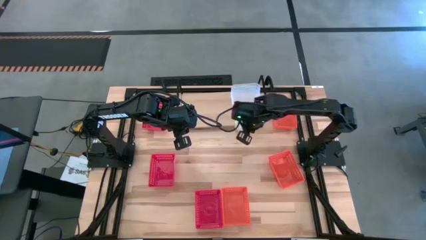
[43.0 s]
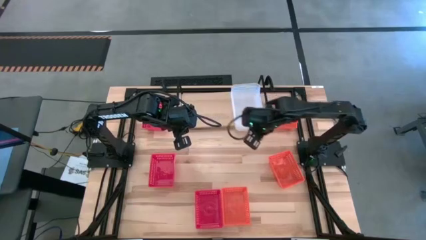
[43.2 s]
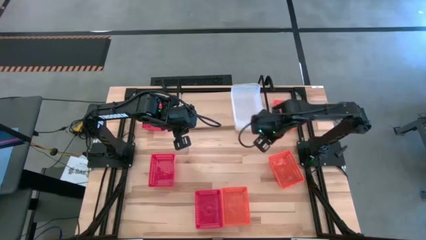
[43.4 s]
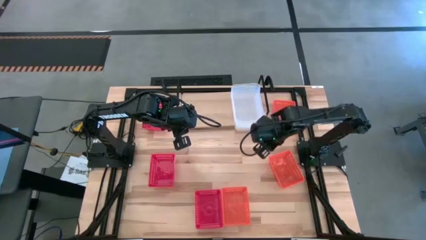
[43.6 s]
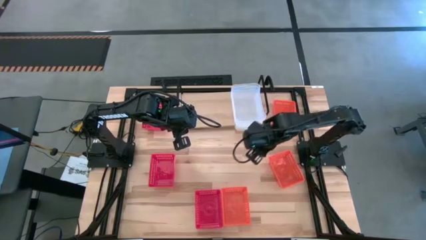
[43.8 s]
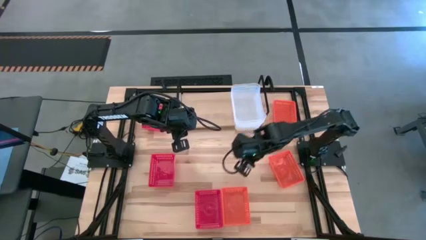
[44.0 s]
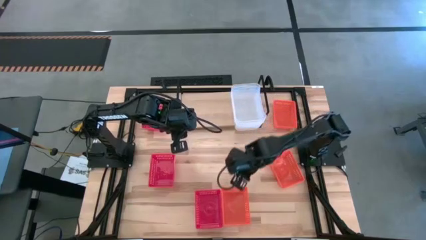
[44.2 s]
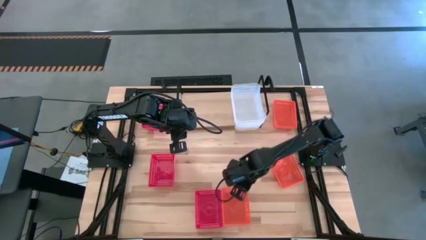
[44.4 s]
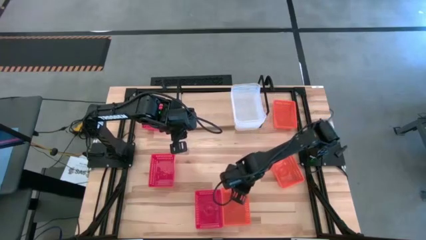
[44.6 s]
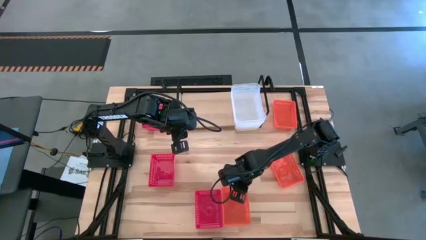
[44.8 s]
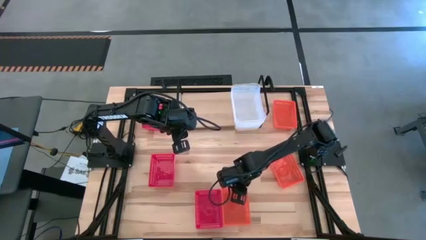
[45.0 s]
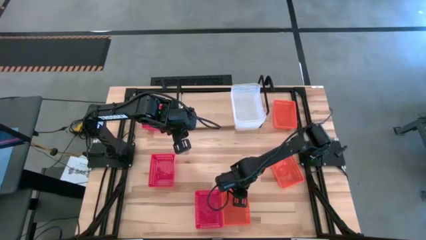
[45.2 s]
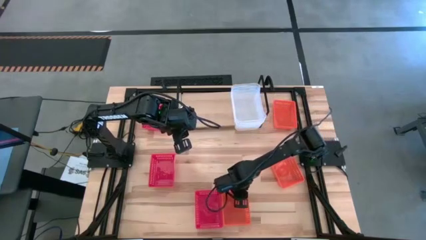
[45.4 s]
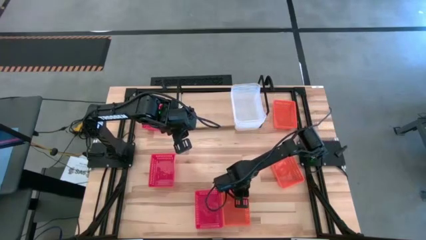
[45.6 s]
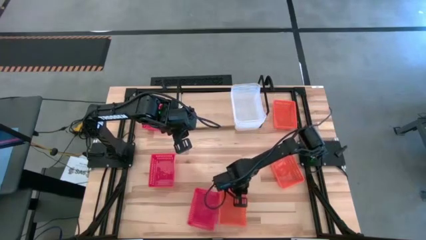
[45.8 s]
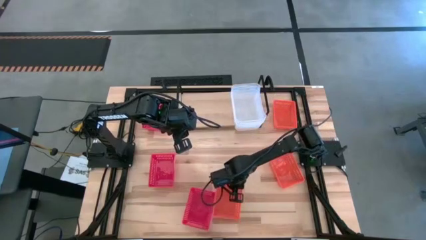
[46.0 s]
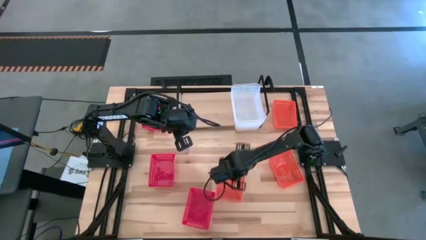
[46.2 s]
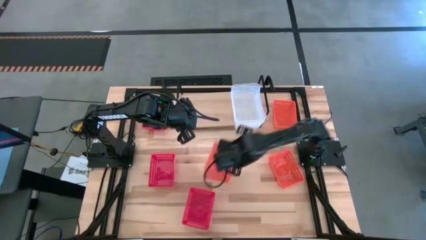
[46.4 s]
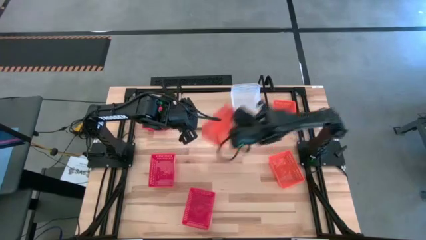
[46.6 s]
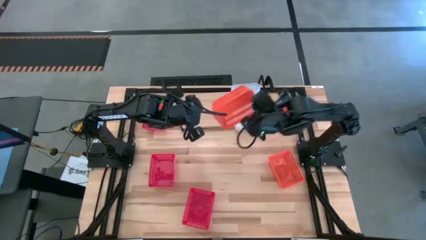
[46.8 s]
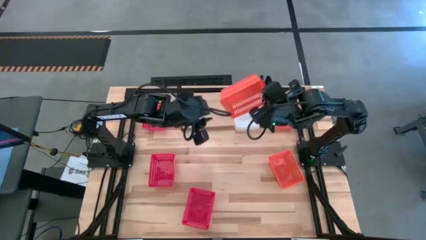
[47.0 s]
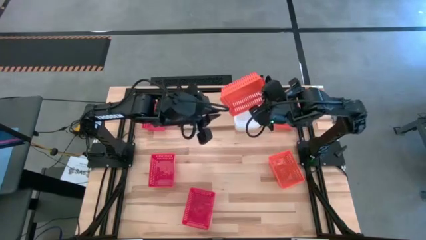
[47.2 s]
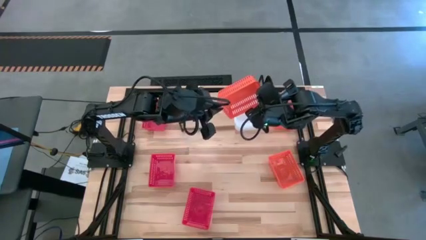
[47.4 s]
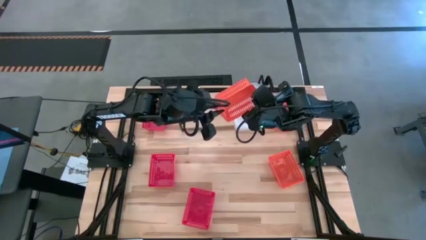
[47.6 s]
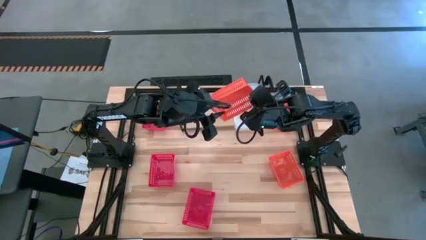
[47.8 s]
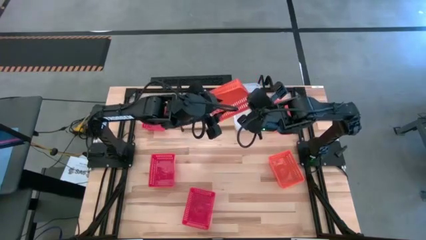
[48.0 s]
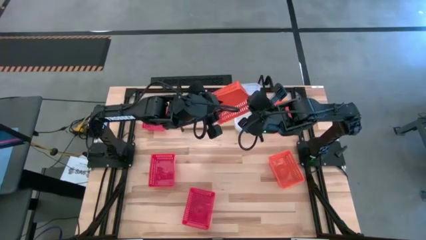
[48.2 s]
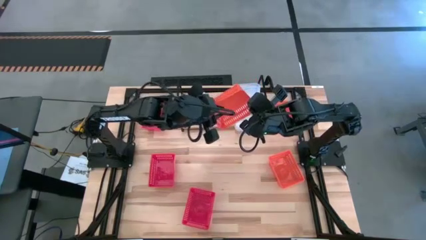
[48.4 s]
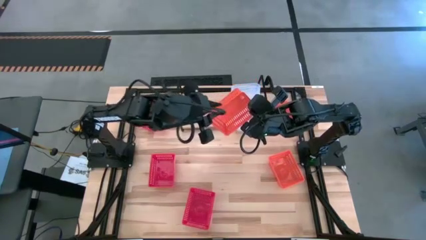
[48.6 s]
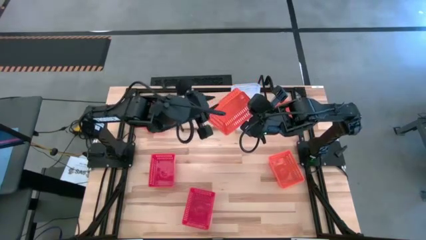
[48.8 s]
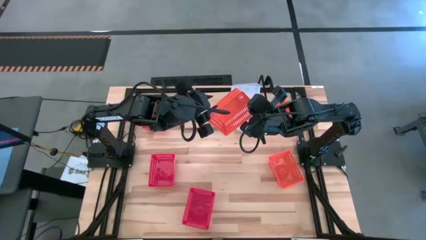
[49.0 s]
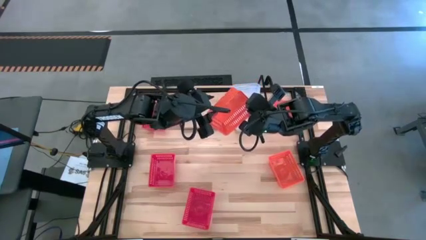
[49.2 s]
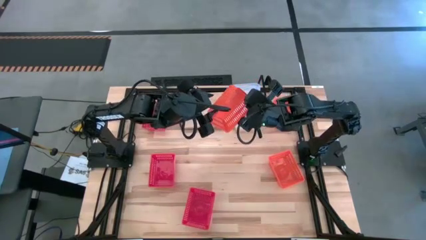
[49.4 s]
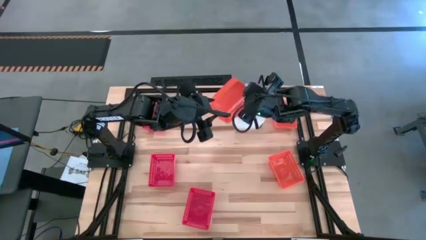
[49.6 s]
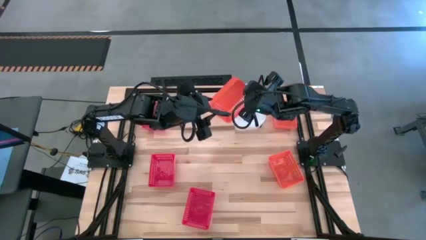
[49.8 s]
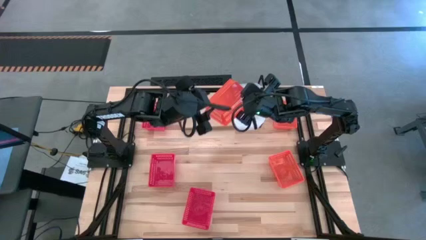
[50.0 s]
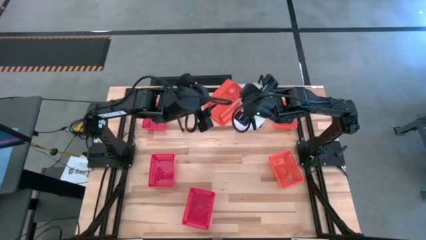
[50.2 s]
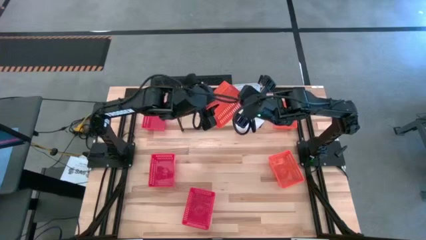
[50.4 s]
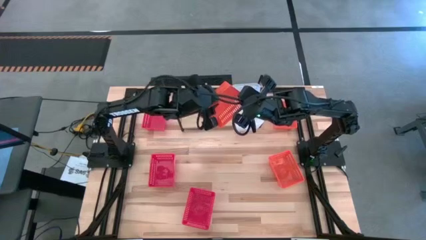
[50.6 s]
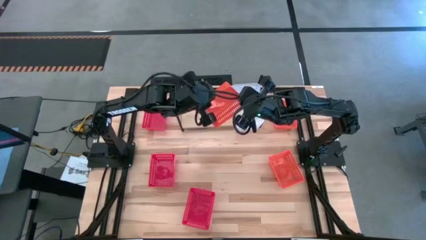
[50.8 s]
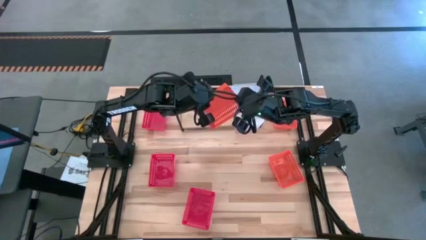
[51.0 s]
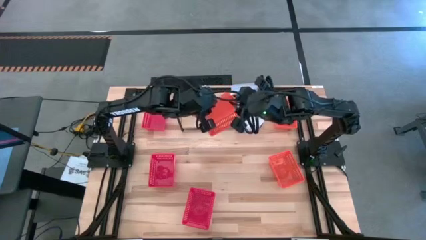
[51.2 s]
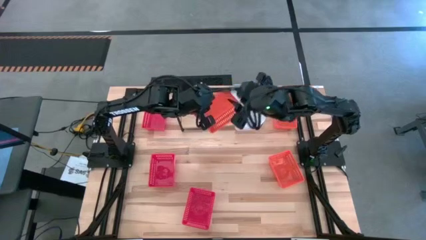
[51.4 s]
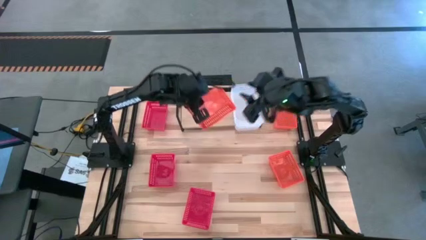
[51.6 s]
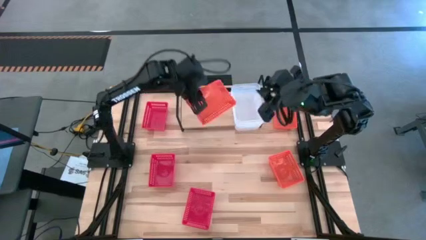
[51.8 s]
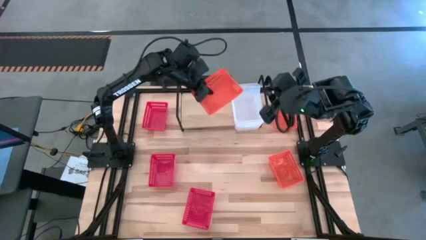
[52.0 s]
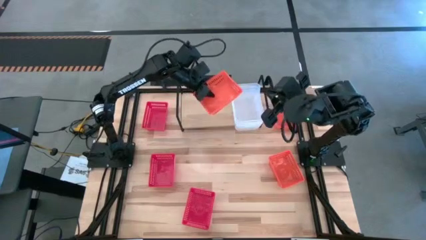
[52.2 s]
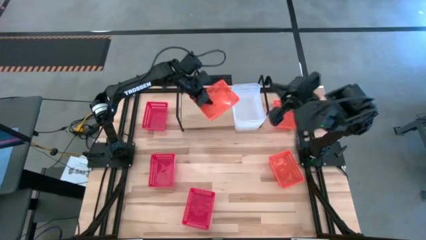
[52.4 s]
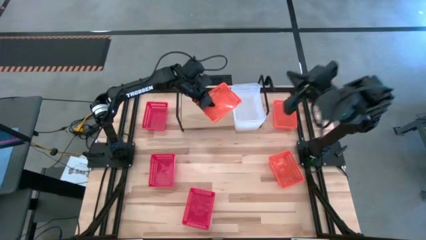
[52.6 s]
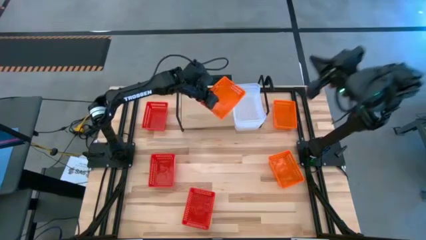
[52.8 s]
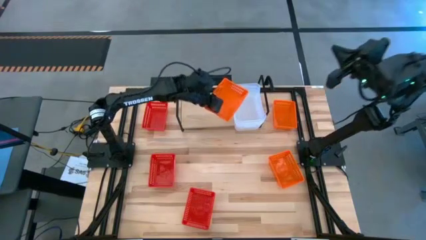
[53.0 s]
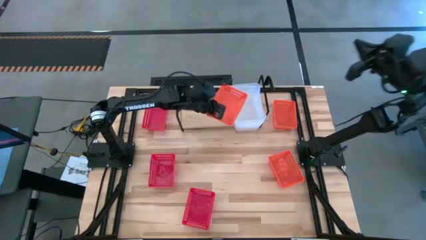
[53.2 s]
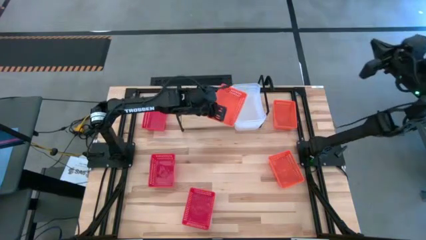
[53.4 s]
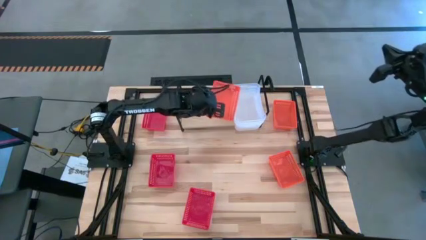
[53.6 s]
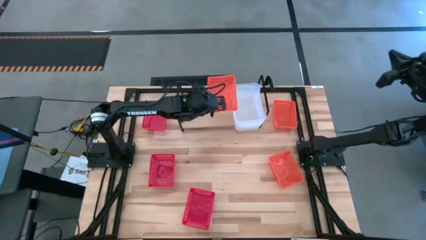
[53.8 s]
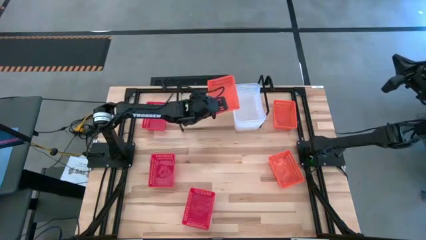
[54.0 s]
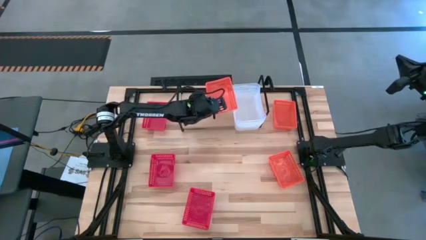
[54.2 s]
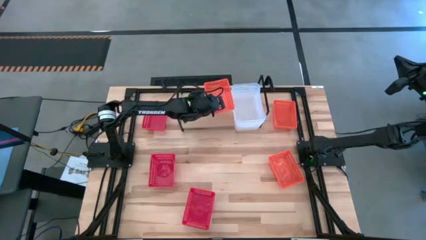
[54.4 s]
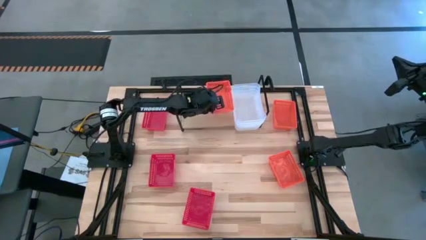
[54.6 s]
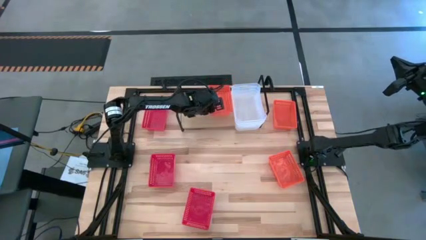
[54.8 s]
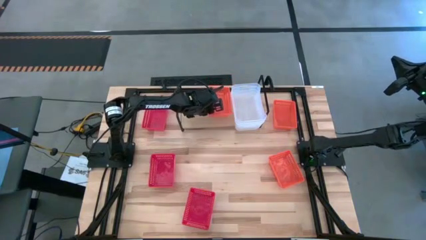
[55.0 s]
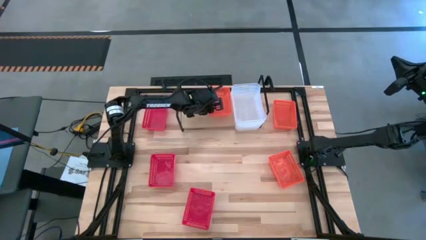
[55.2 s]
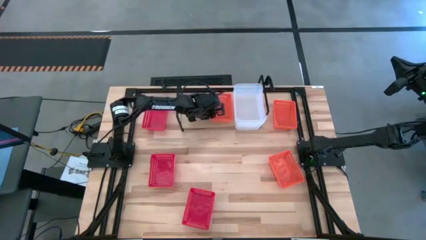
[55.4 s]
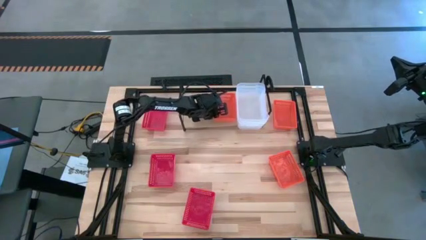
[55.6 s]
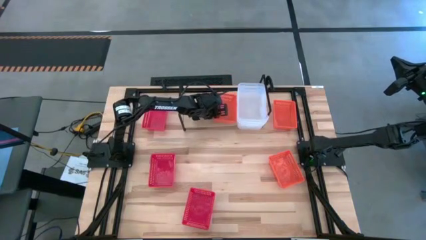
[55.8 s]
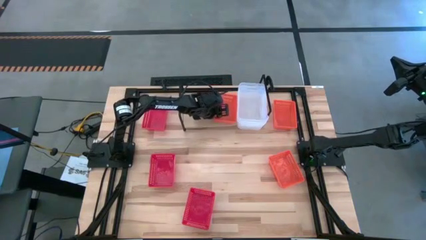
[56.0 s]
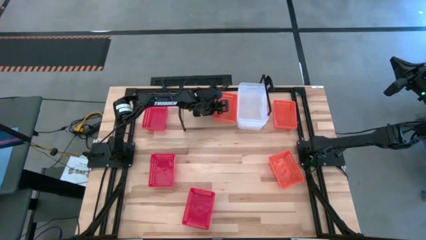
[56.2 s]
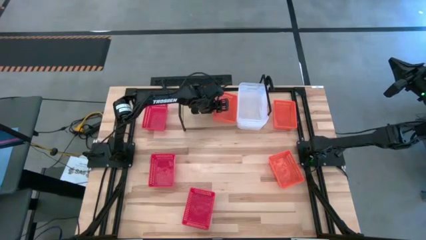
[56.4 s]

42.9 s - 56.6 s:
Task: Stack baskets on shelf by color
Put the bottom orange bin on the shelf

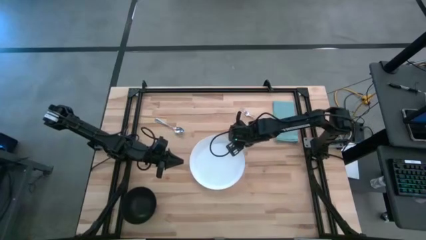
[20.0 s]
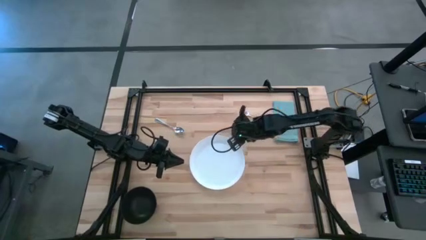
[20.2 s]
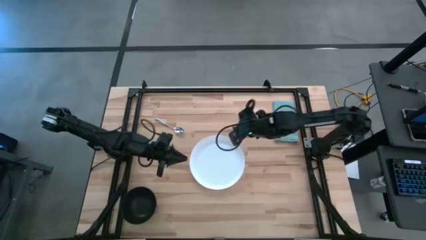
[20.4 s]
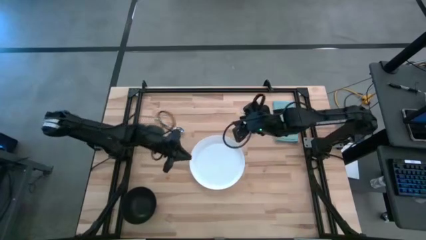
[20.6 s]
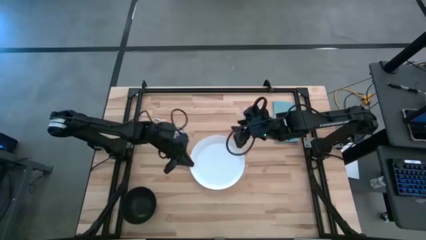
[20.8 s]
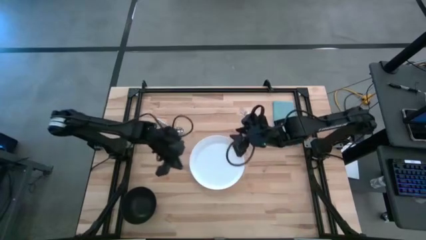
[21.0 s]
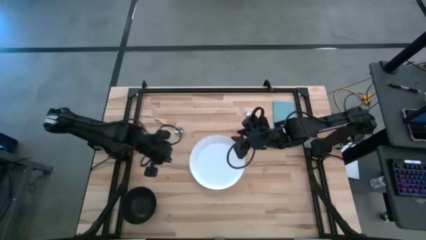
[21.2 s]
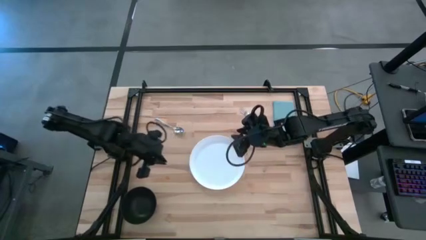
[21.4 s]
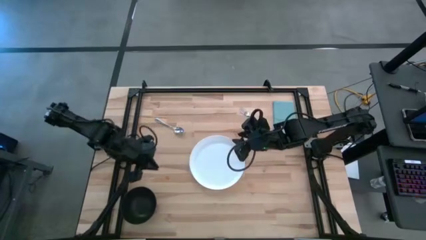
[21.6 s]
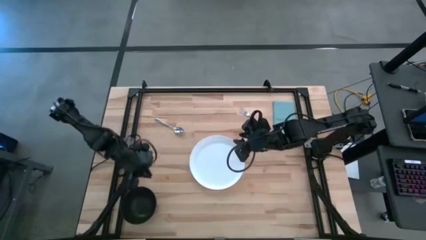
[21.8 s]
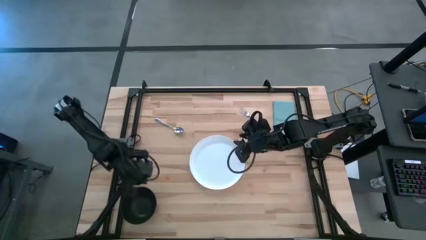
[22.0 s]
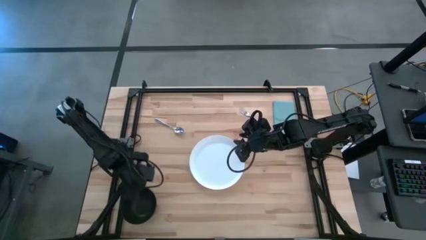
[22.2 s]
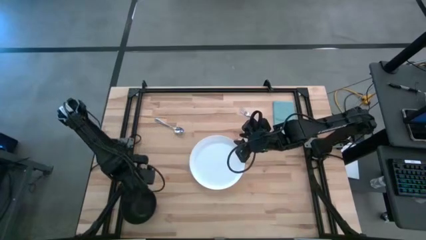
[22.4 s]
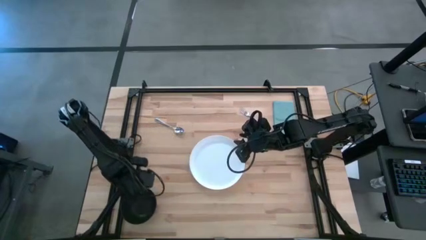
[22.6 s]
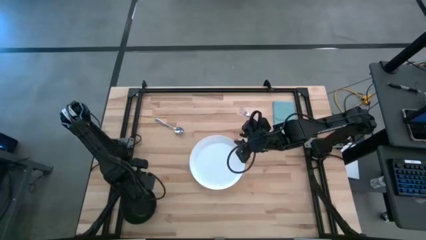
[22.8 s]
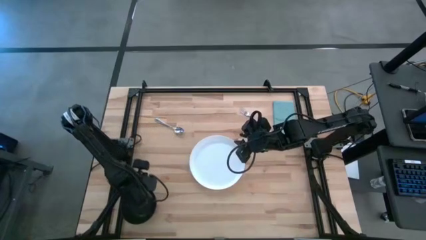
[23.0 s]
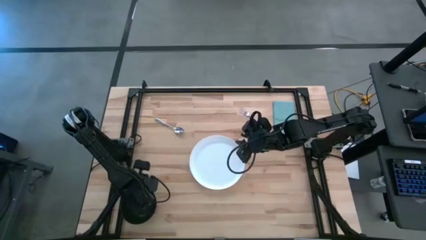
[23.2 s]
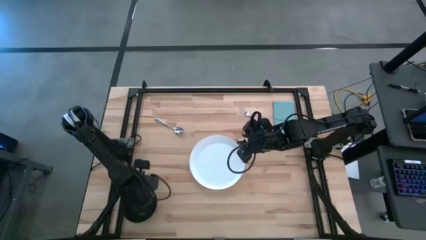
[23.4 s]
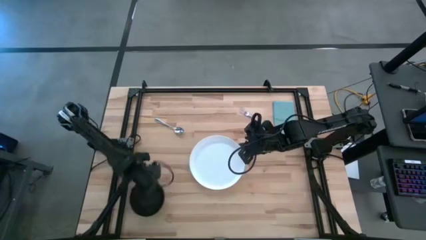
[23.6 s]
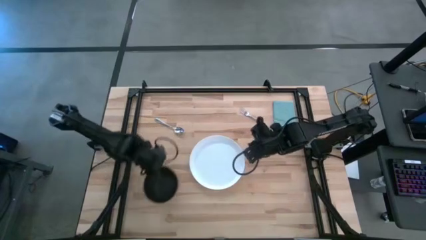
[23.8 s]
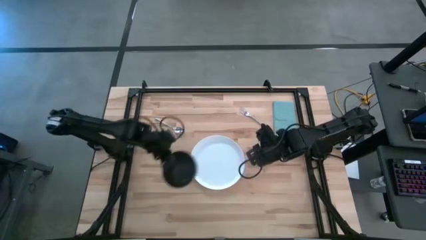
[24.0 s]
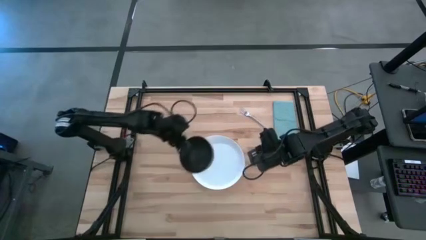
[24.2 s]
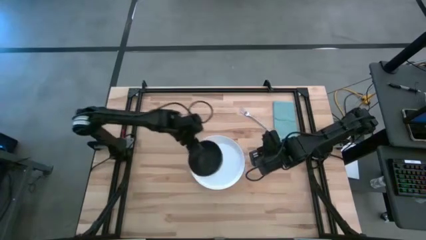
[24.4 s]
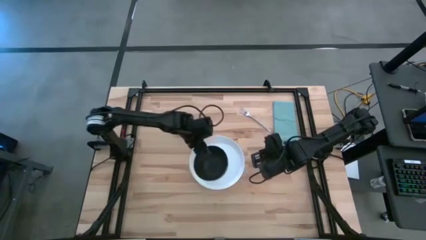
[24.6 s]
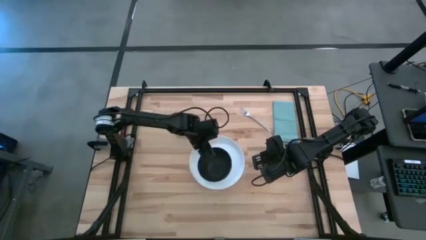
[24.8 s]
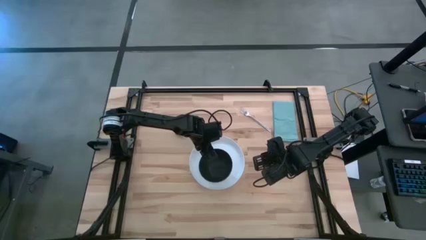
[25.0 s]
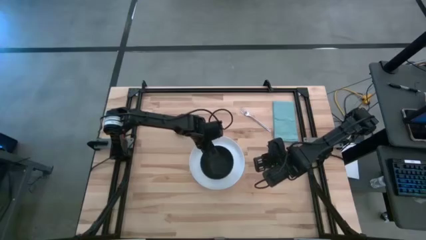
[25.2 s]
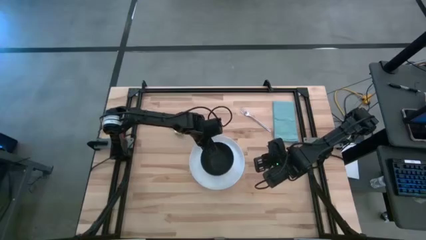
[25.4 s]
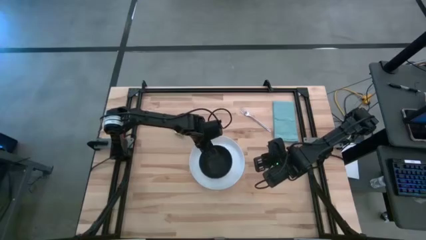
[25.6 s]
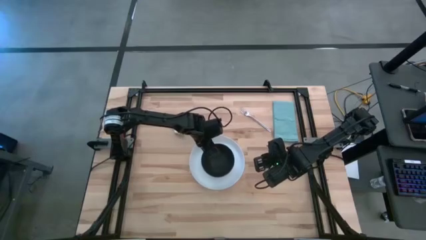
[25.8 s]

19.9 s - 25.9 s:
Task: Set table place
Put the black bowl onto the white plate
